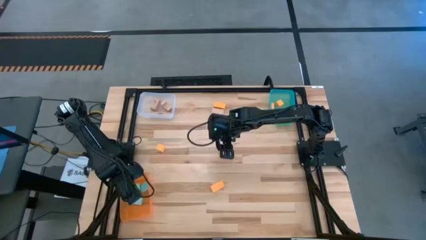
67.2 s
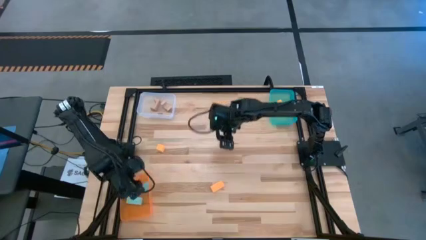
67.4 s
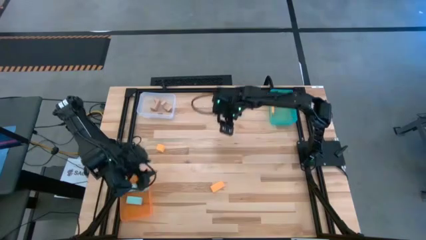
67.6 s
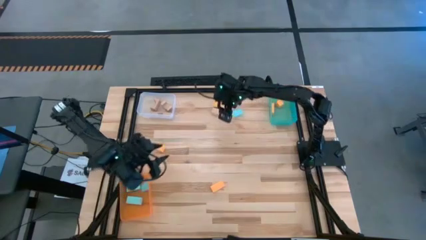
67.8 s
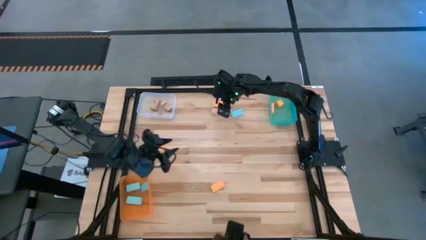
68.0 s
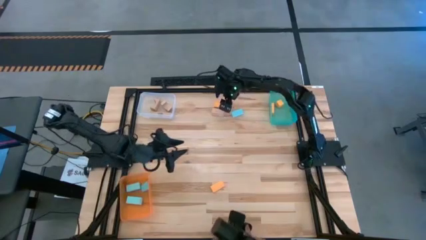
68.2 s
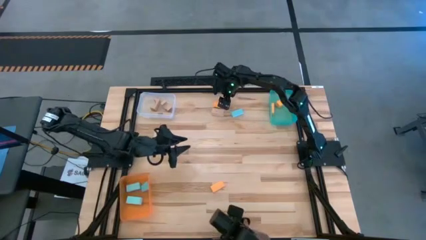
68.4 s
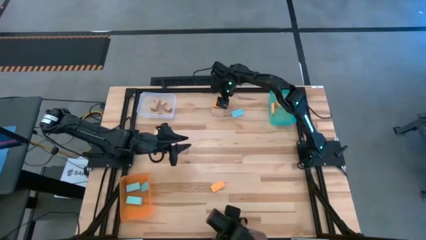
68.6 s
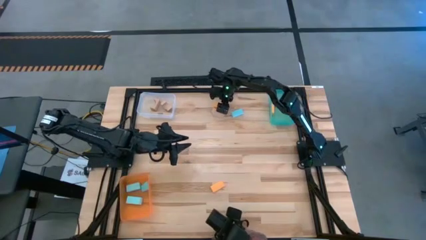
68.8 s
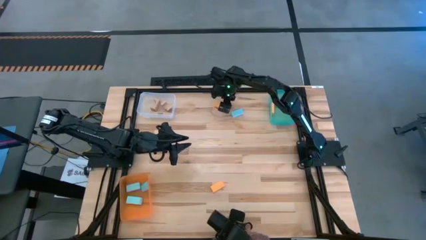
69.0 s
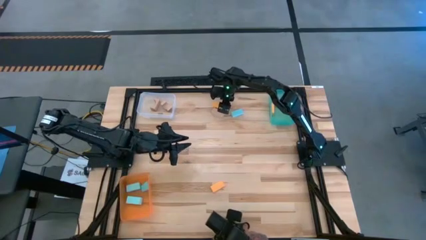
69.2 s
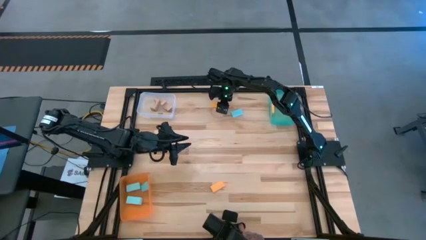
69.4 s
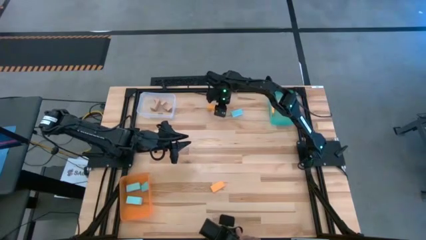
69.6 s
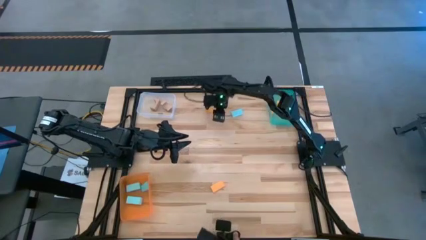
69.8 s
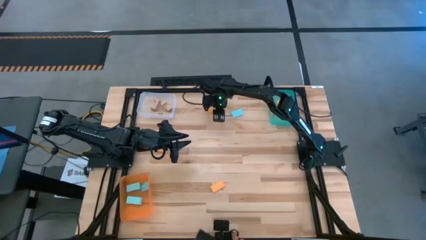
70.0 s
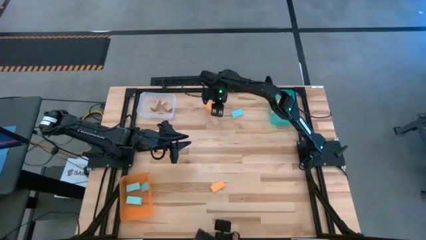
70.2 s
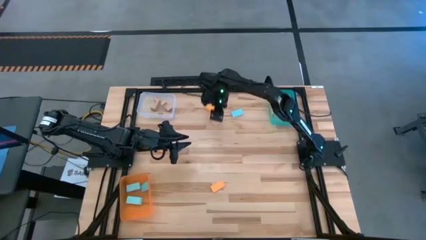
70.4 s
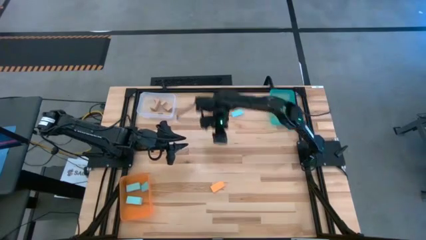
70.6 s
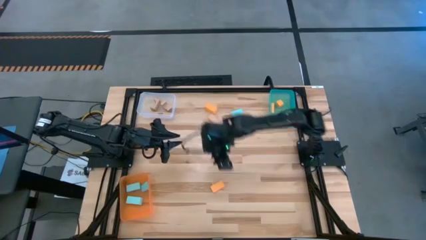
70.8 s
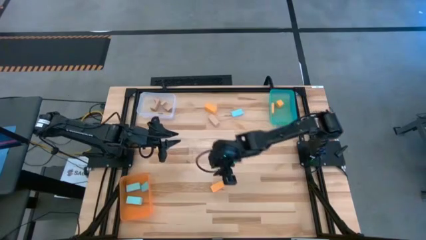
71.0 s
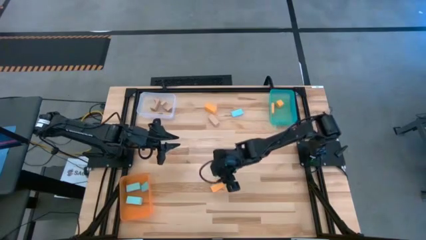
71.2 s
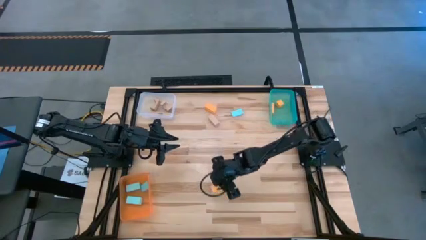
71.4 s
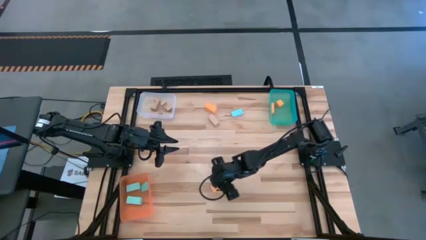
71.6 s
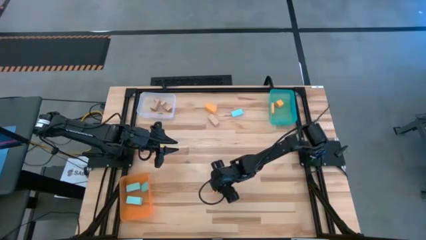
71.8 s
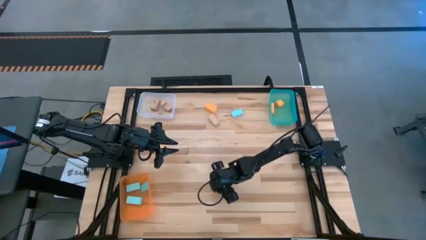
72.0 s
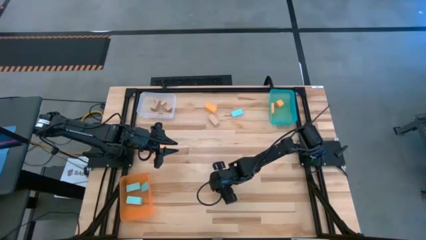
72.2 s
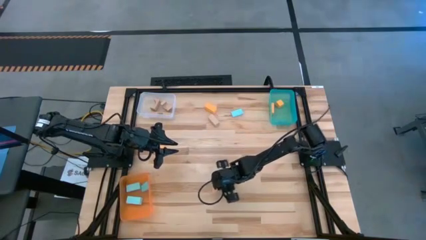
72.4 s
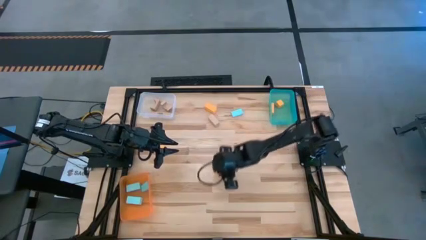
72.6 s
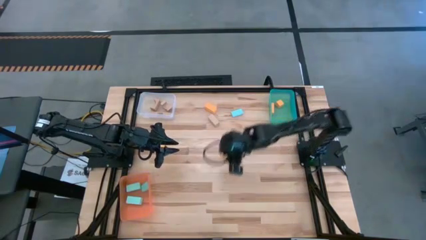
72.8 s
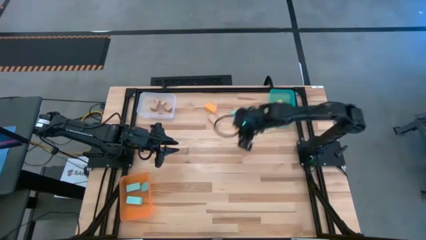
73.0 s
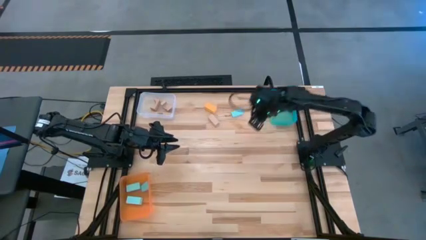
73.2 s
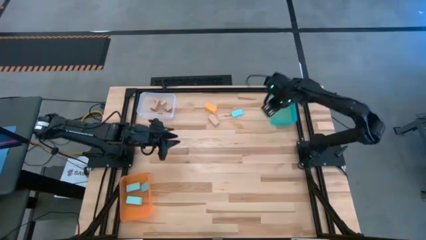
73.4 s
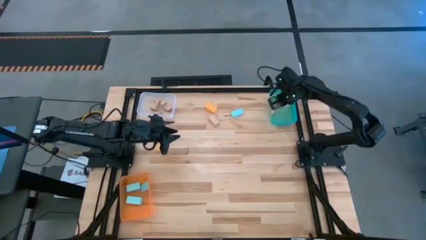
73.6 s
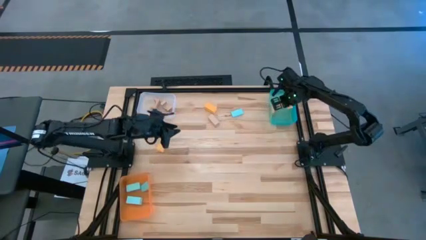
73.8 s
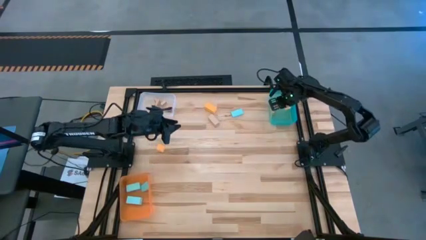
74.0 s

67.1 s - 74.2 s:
Task: Sort & place blocks by color
Put the orange block into the light blue bin

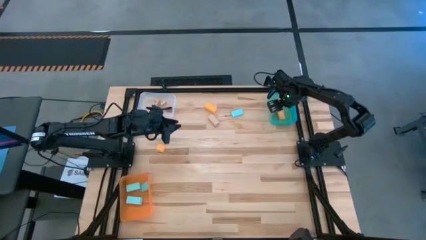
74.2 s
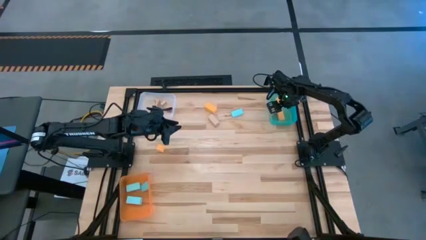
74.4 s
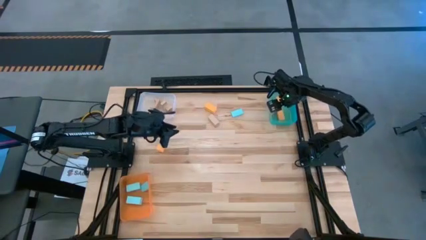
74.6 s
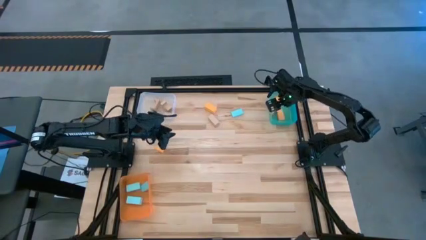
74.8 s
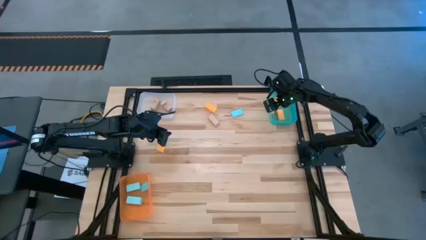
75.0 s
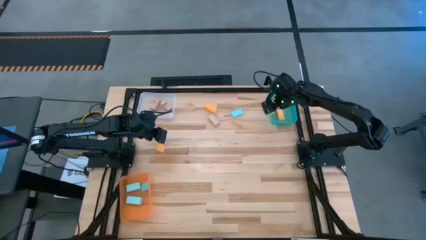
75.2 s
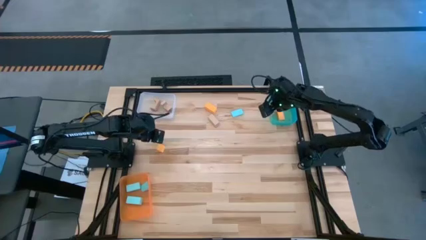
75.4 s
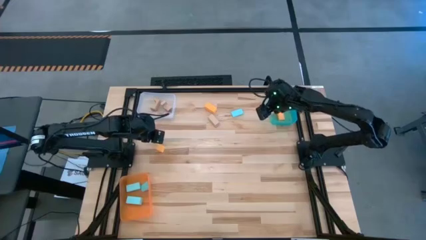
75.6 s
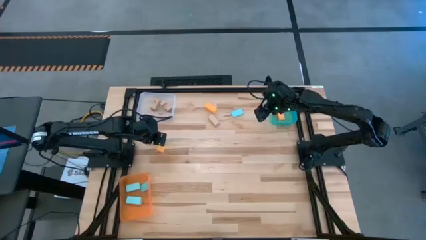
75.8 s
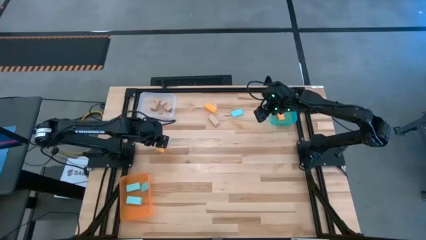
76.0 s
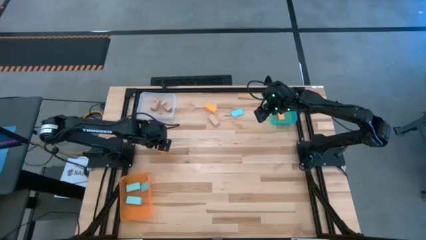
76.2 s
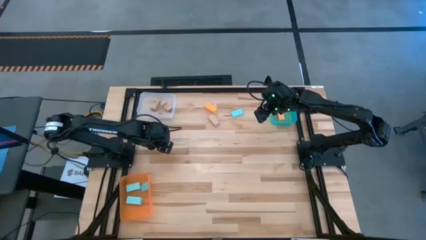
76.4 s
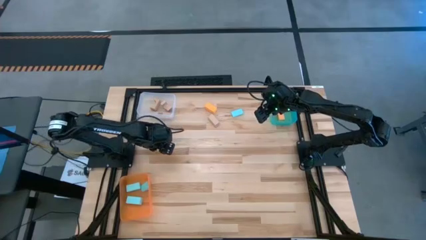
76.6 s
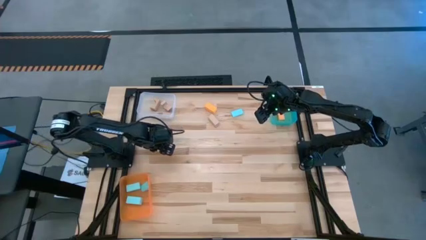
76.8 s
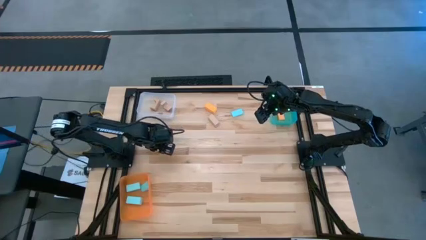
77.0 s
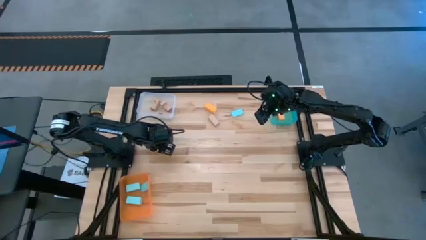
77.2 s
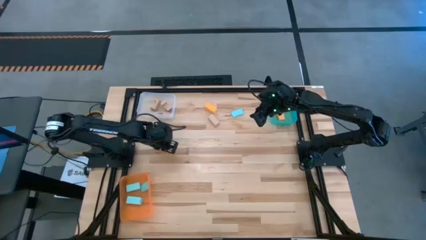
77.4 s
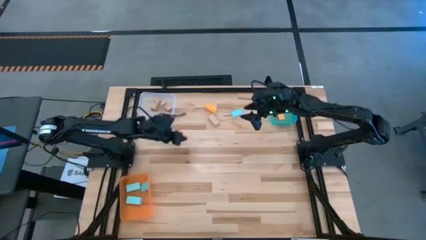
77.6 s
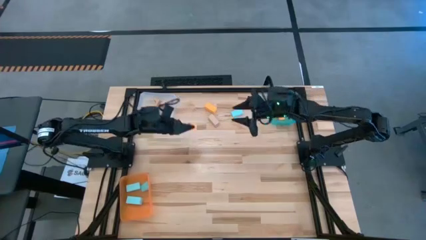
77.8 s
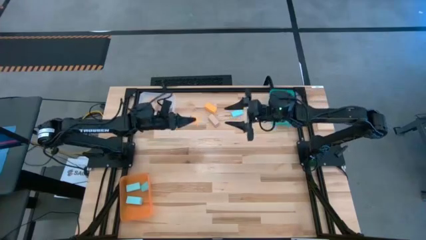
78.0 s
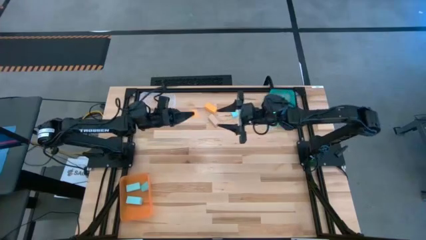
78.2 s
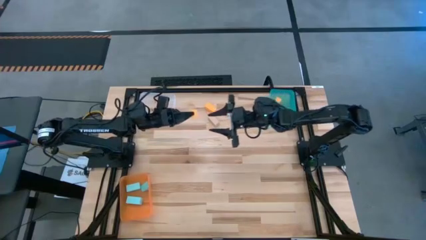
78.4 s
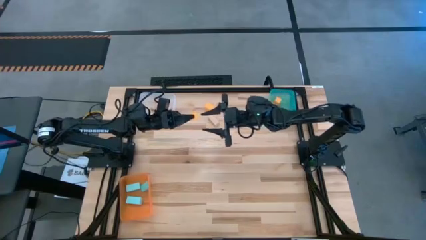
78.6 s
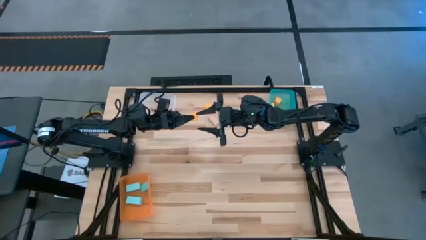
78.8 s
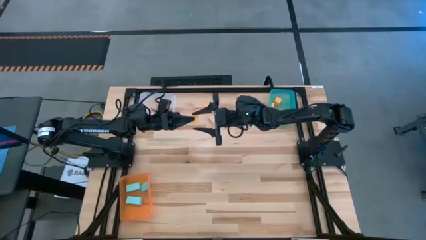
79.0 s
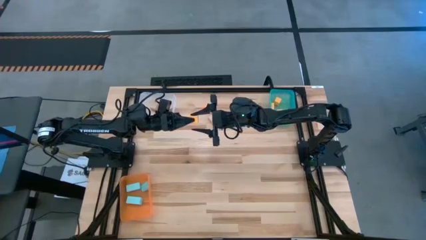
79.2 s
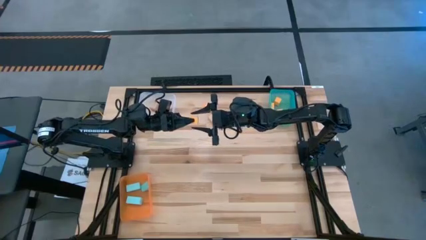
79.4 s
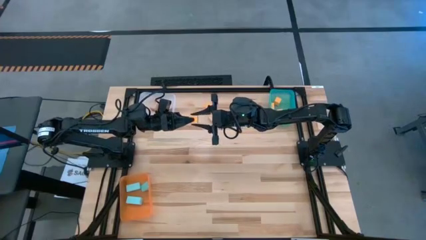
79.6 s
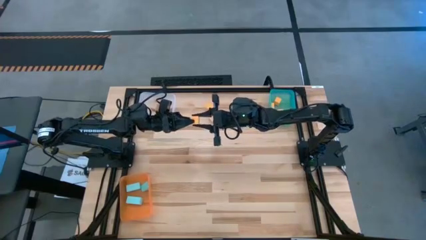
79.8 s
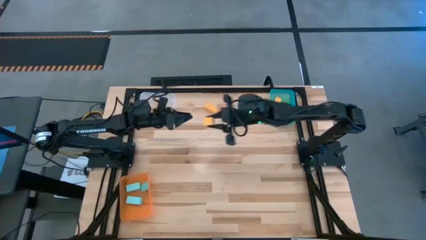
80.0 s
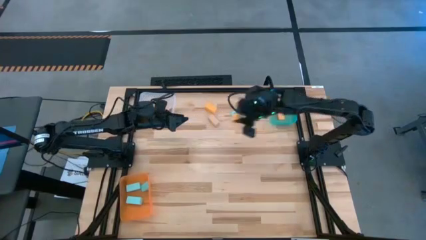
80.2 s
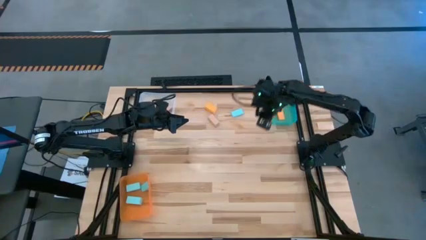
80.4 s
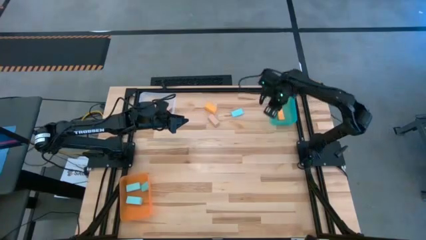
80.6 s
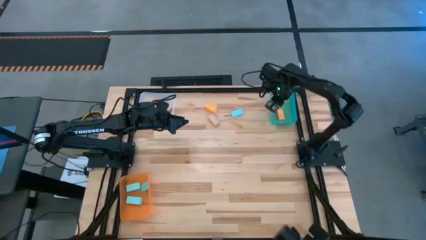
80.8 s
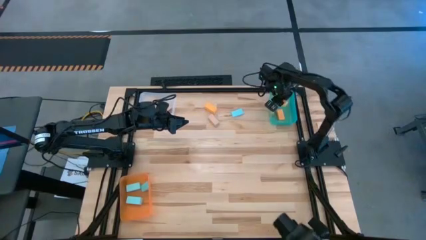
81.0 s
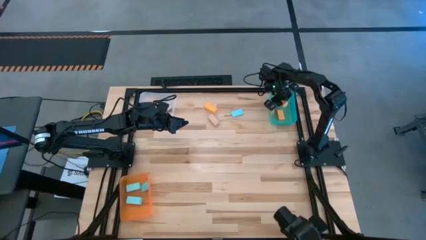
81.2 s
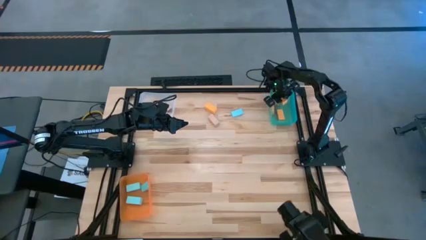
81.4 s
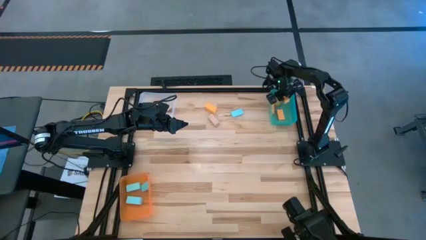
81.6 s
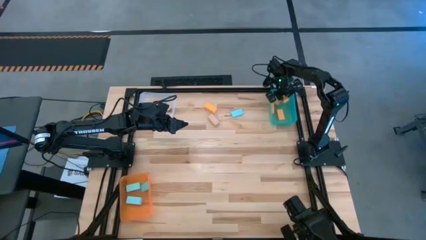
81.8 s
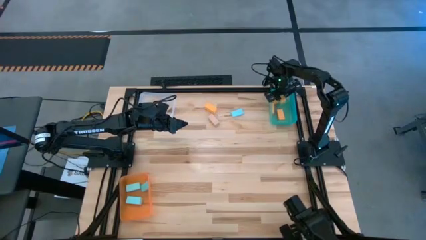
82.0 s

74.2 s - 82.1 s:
Put the orange block into the light blue bin

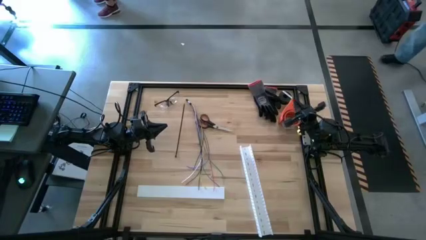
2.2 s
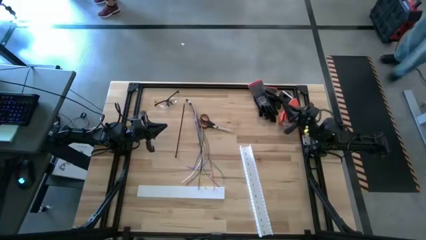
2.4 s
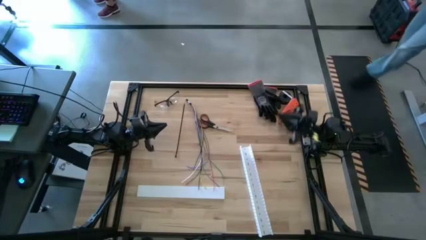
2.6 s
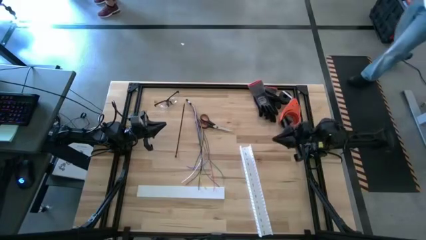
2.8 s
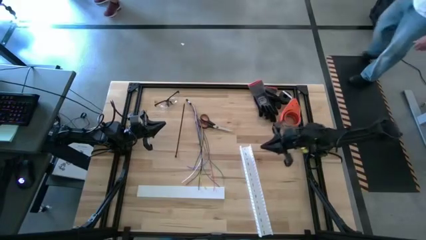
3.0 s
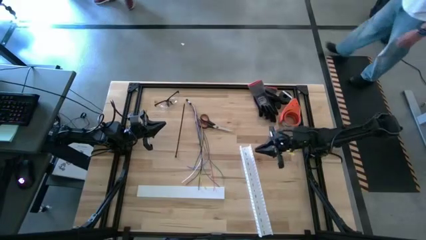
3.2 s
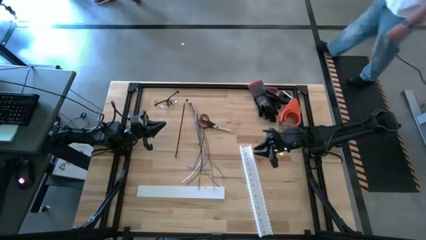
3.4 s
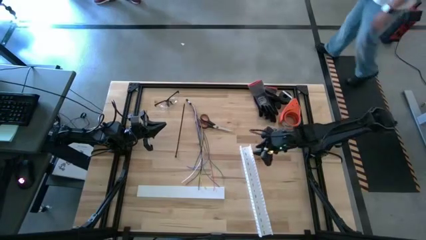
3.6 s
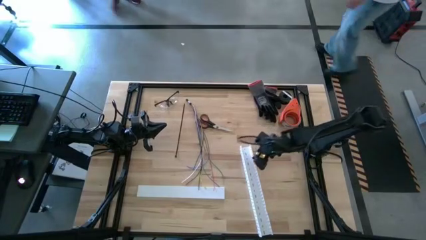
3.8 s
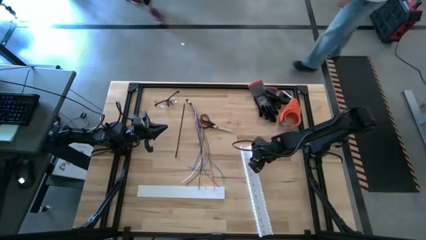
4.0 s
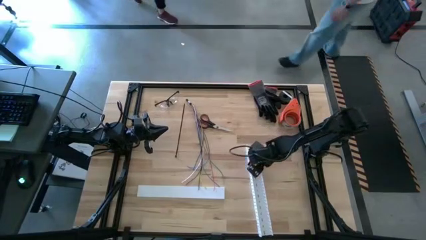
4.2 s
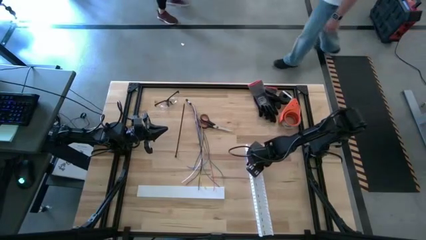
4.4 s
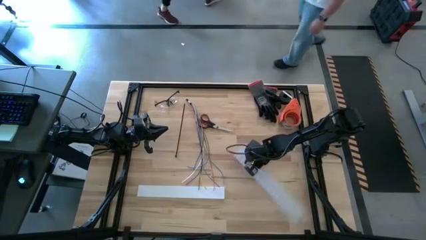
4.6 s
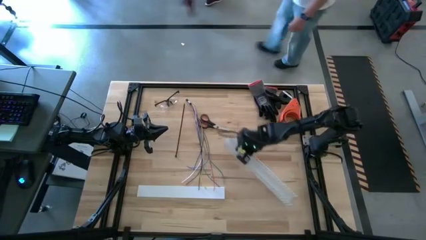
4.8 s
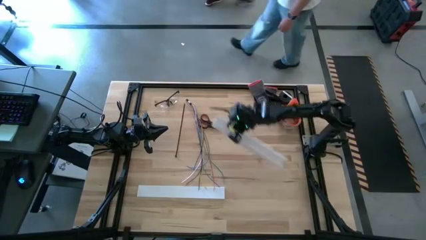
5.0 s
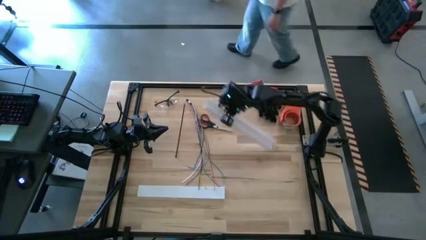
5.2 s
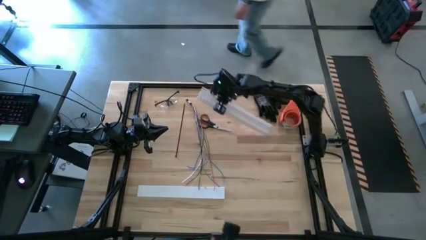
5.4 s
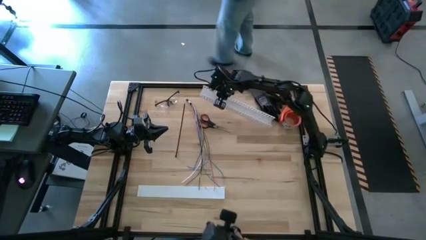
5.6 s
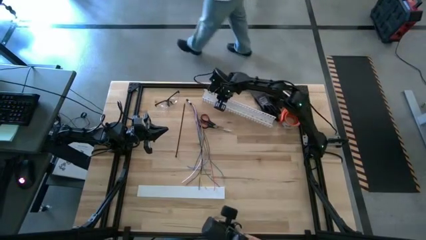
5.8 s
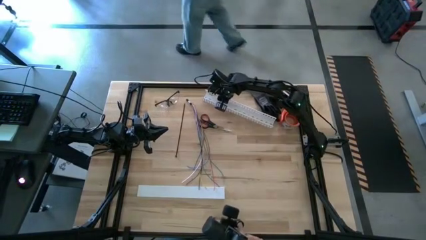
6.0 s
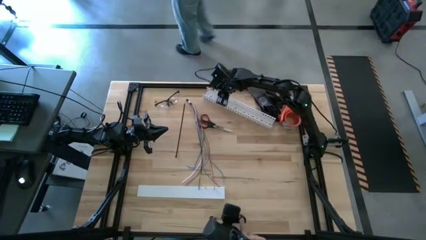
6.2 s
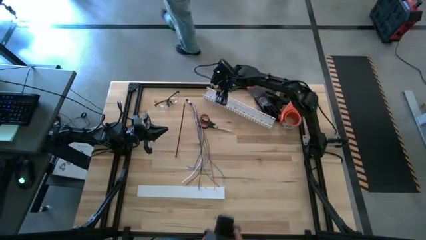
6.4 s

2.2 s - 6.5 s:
Task: Ziptie cables
Move the white cable duct to the top of the table
